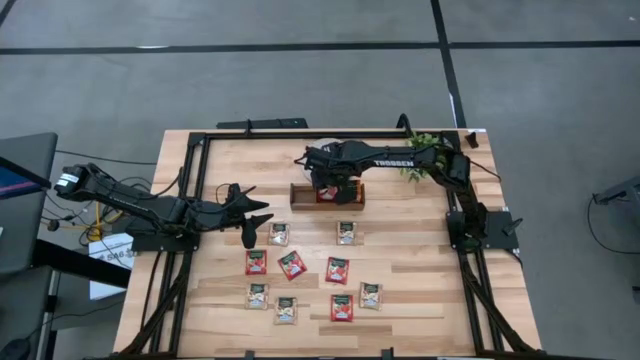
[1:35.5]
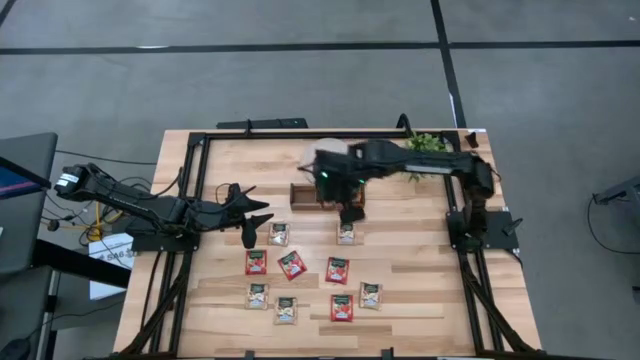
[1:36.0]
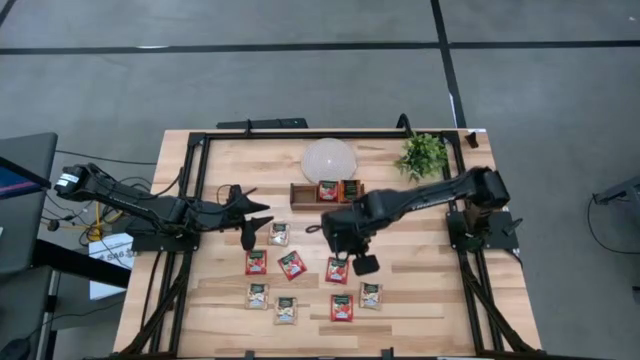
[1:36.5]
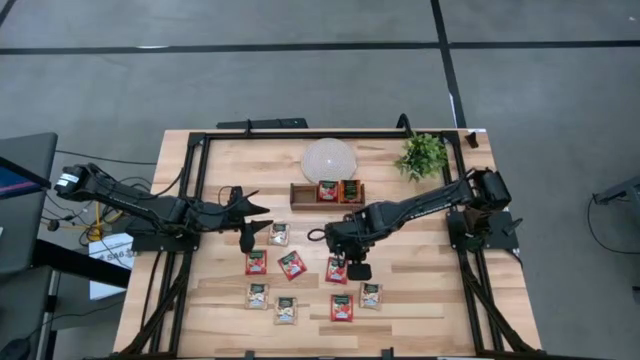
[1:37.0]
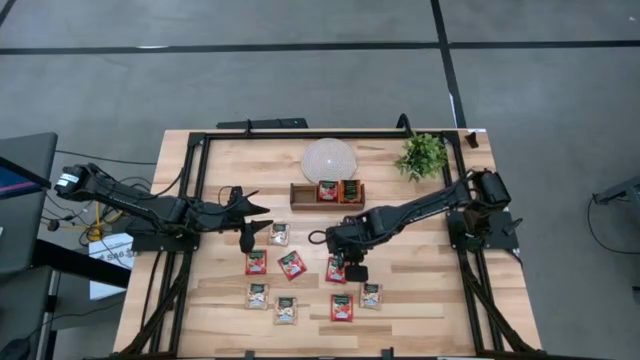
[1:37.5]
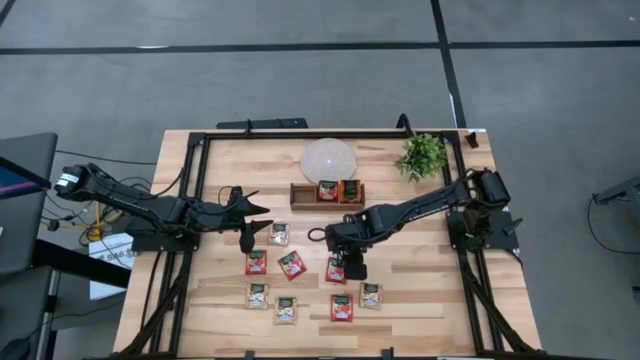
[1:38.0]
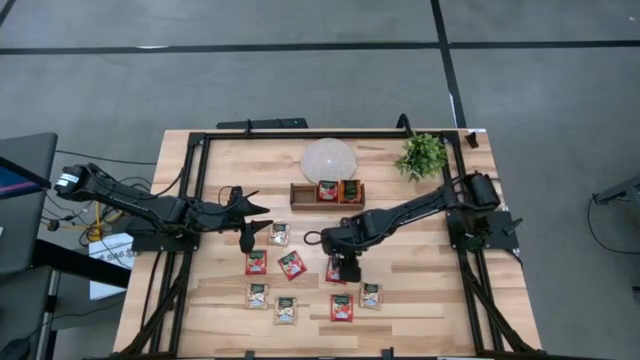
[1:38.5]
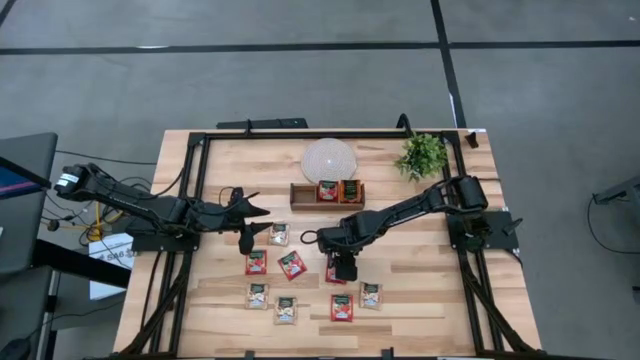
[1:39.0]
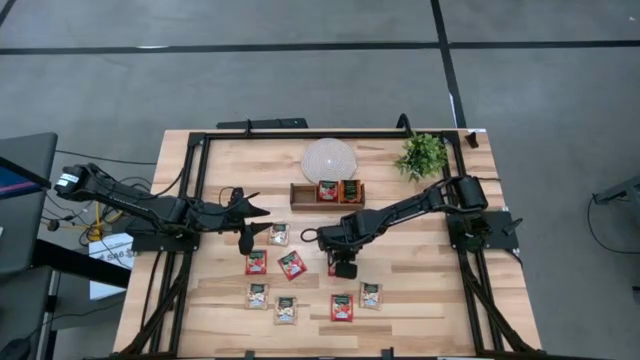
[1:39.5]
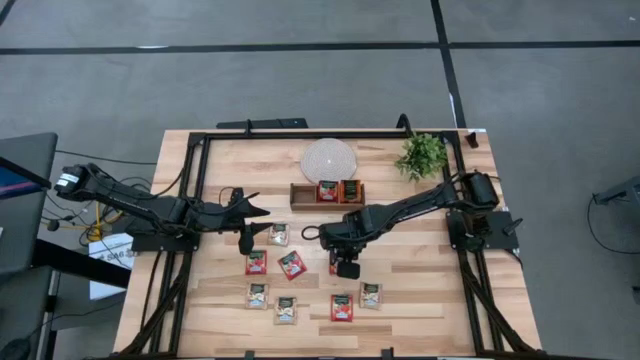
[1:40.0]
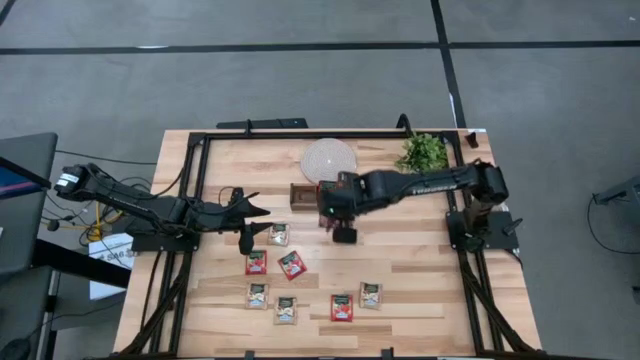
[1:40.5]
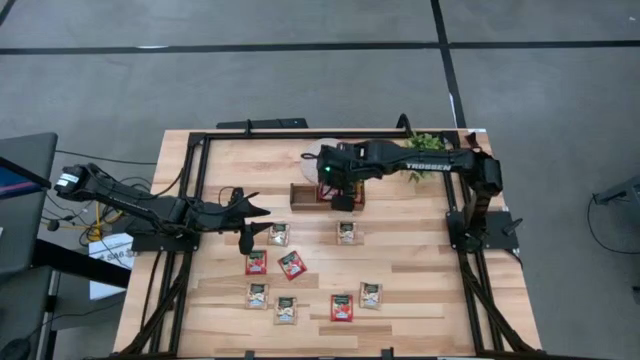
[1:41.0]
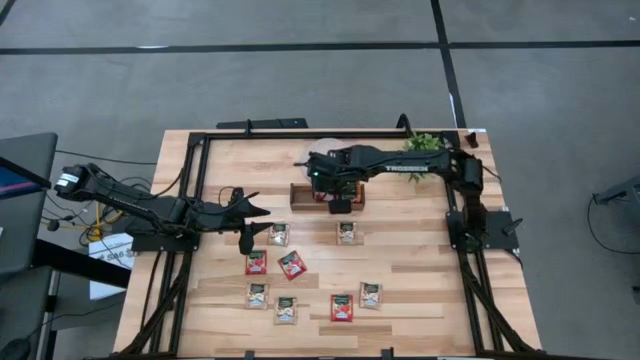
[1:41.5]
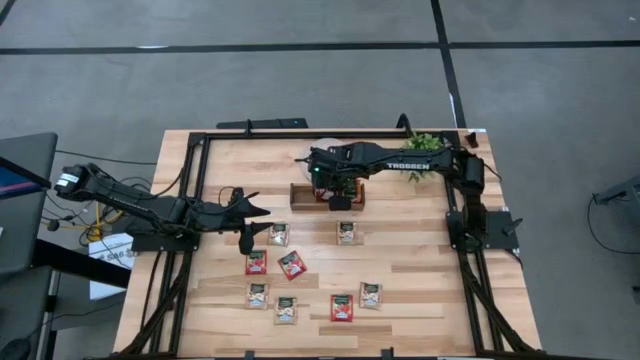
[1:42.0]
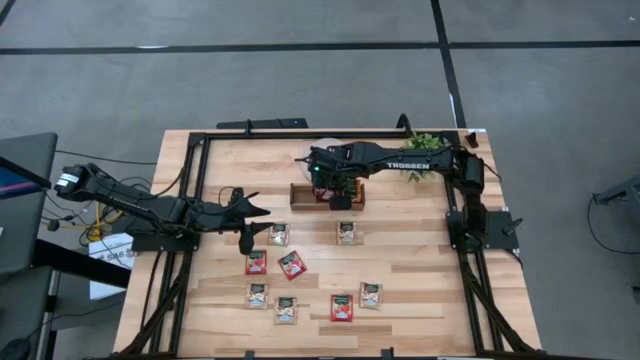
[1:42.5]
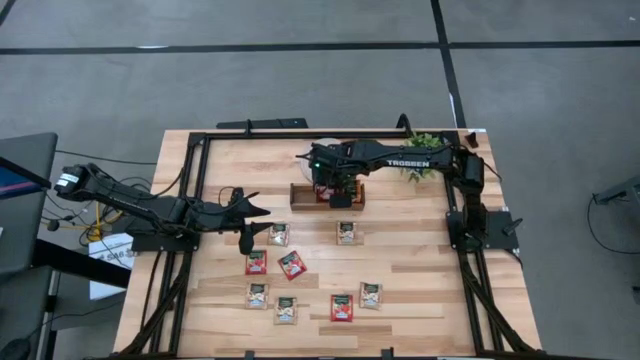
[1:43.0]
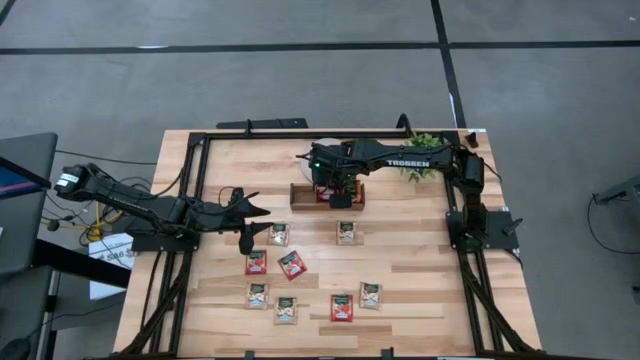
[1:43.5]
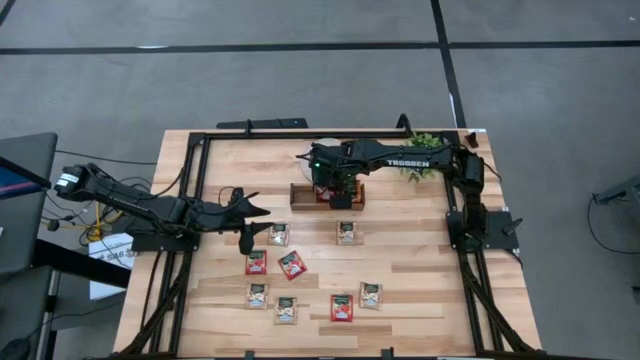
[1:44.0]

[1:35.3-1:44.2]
Task: Pick & Place Tea
Put the red tea bag into the middle compartment of the wooden organizer

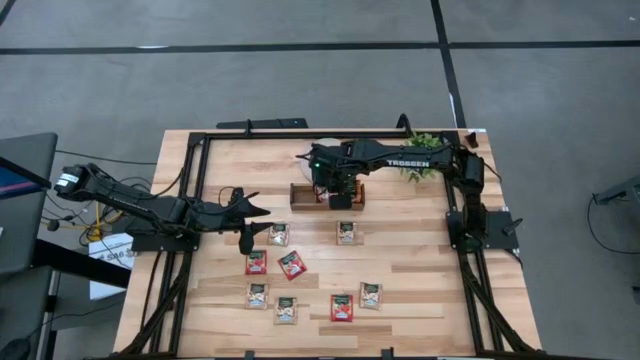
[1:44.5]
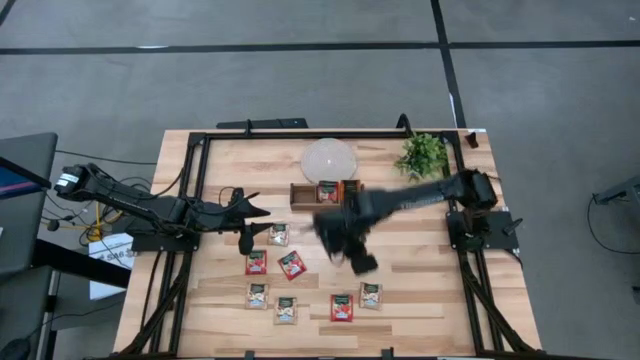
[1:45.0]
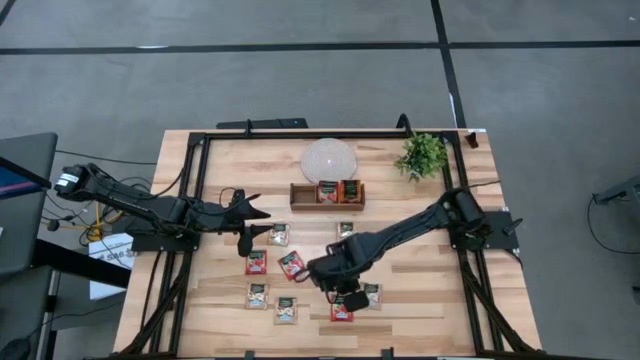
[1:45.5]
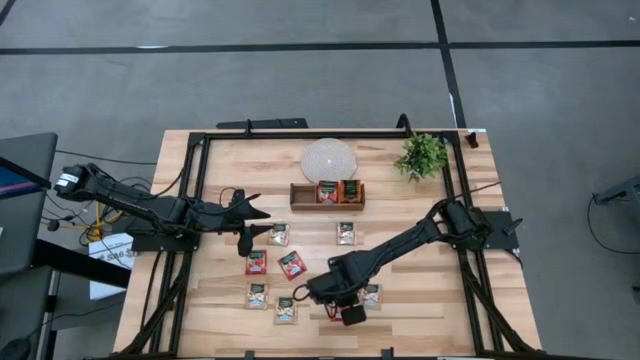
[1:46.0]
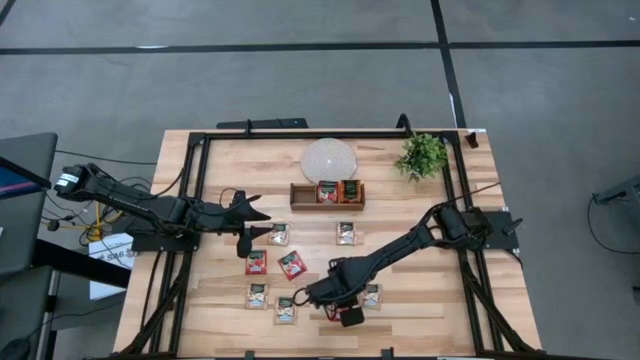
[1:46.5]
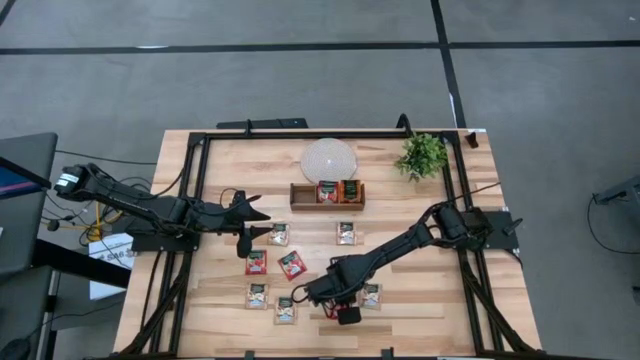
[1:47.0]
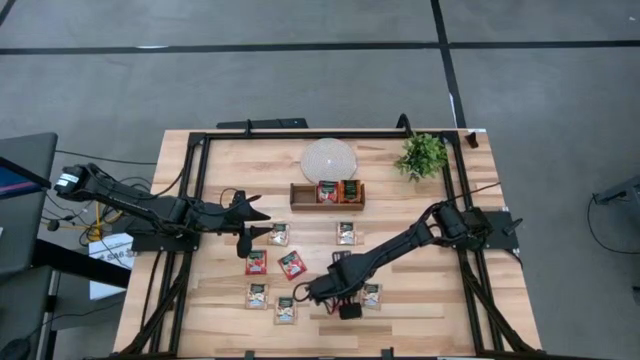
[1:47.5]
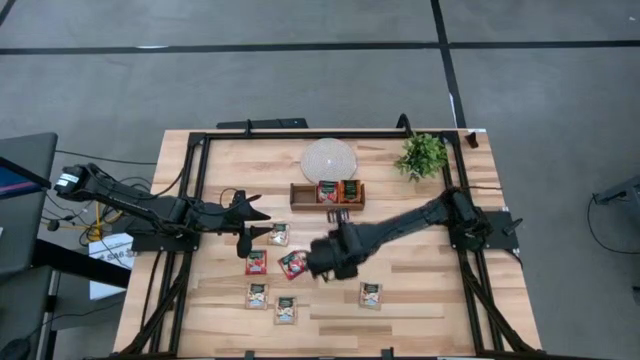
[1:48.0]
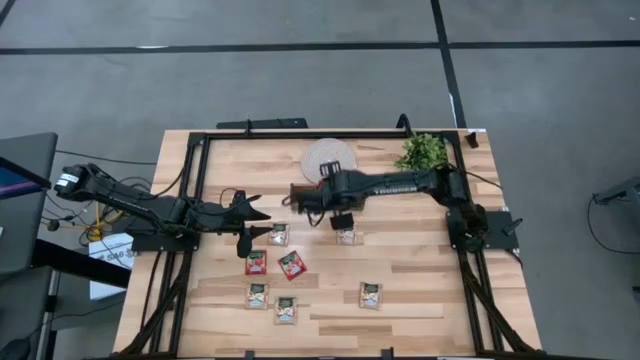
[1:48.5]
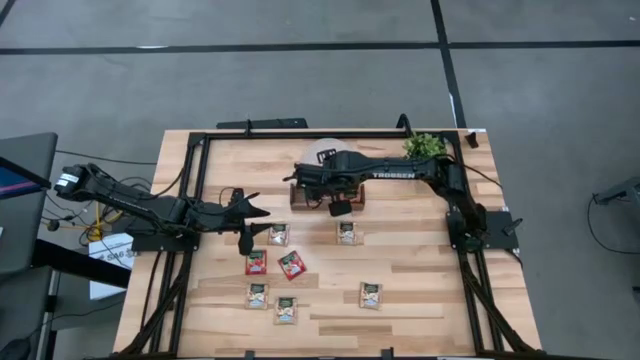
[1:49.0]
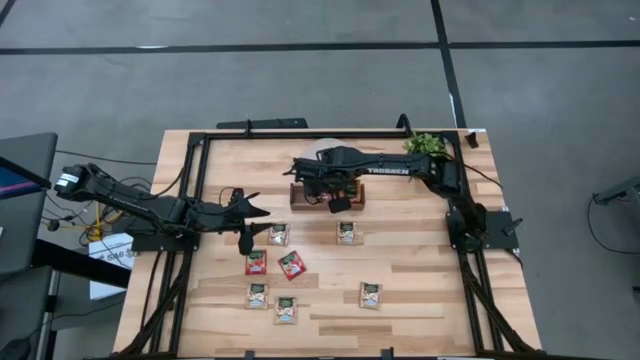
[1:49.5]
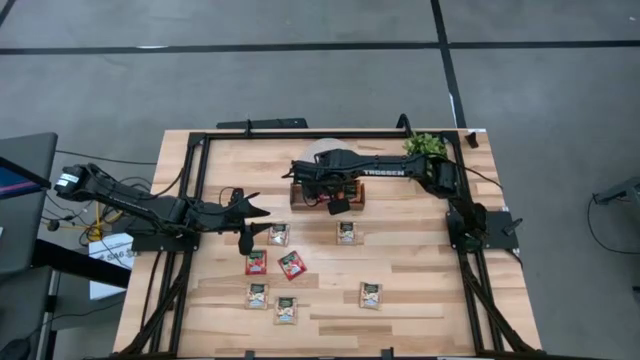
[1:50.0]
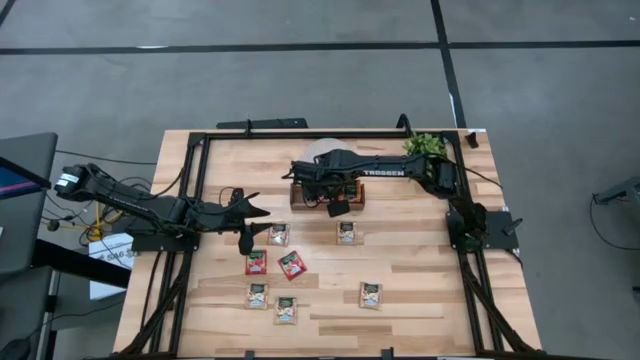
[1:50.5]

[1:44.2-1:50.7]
Put the bottom red tea bag into the middle compartment of the wooden organizer

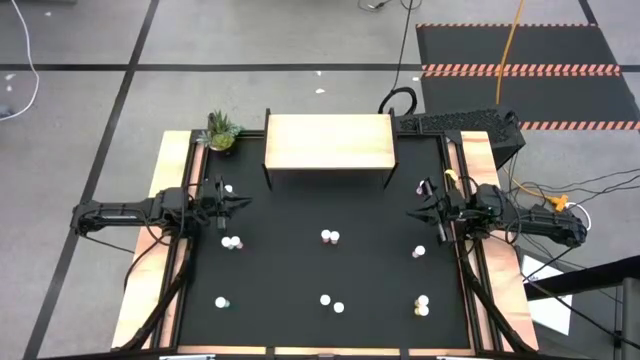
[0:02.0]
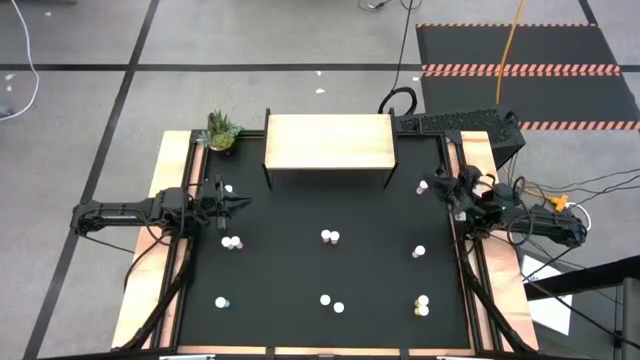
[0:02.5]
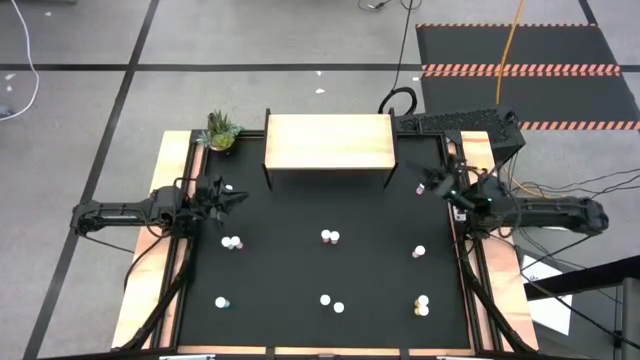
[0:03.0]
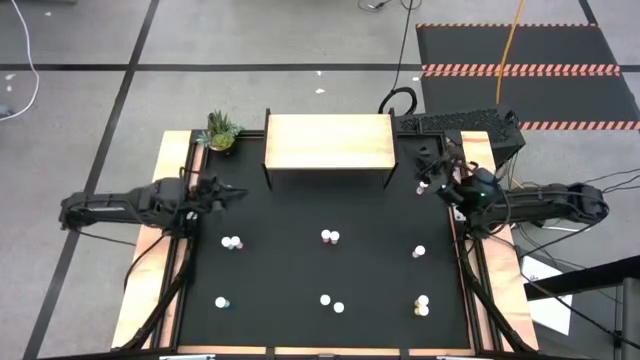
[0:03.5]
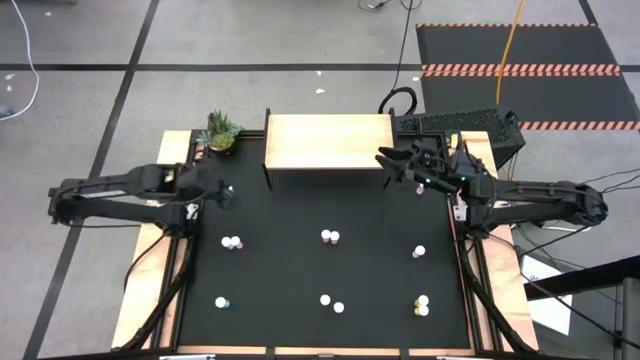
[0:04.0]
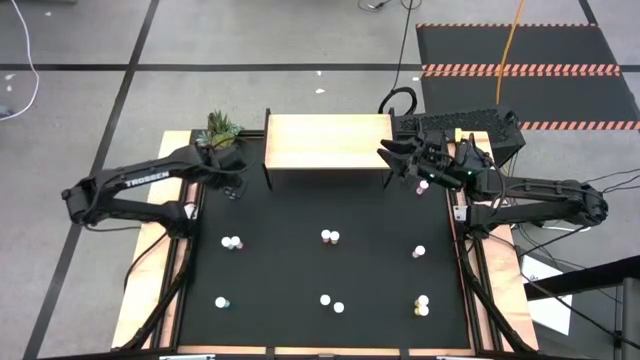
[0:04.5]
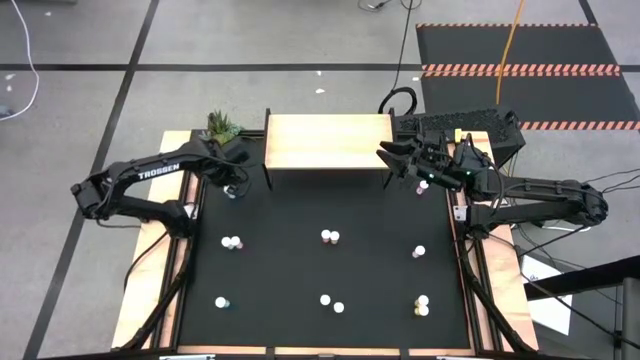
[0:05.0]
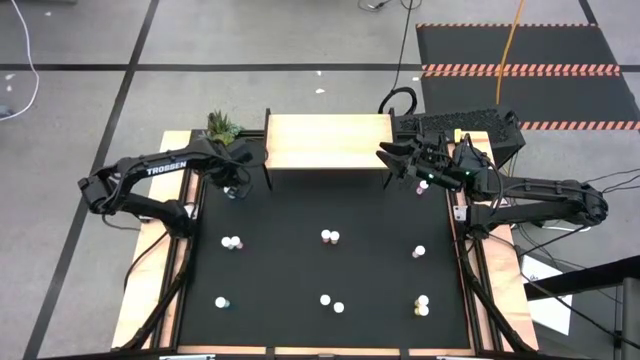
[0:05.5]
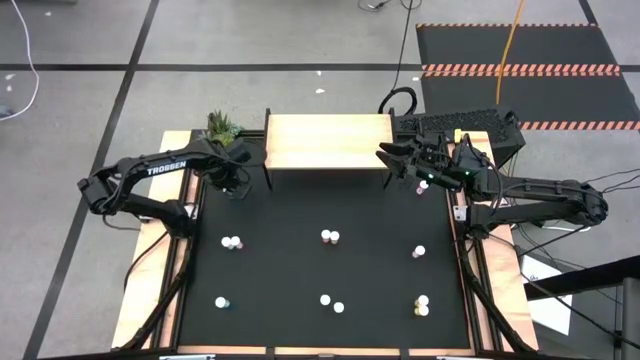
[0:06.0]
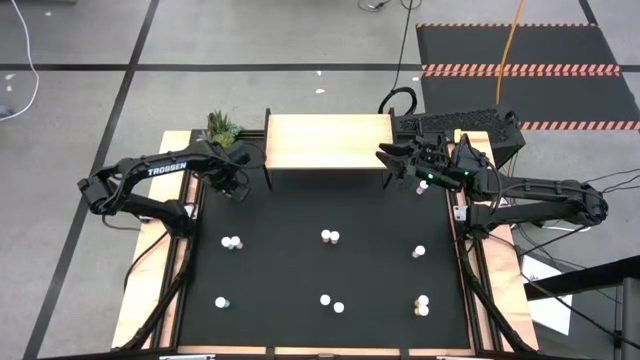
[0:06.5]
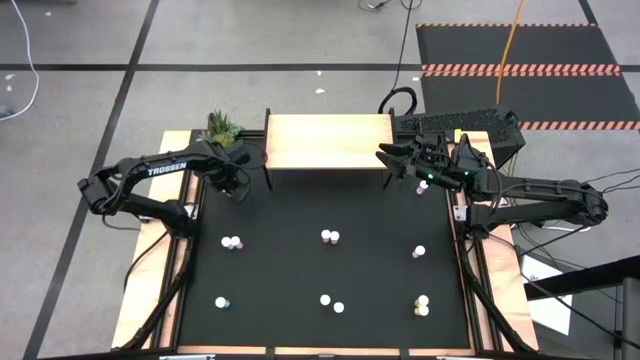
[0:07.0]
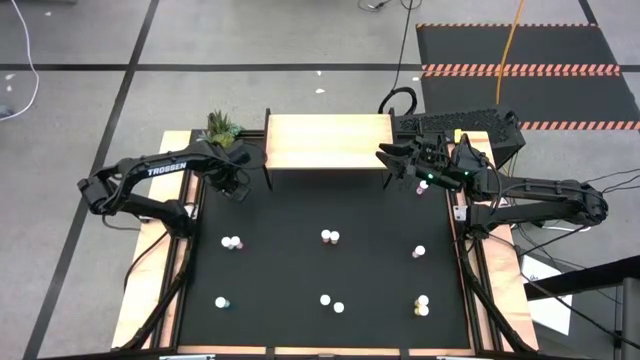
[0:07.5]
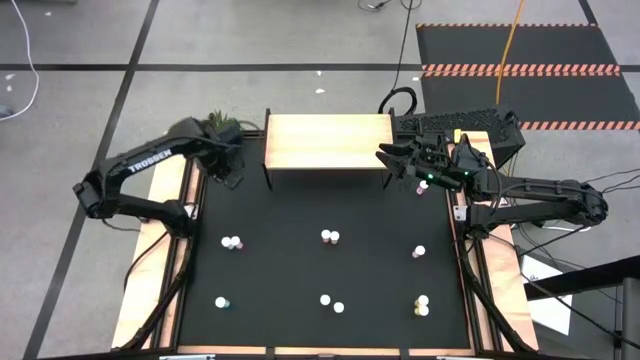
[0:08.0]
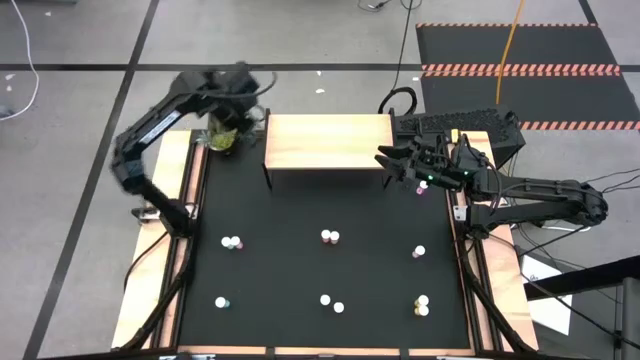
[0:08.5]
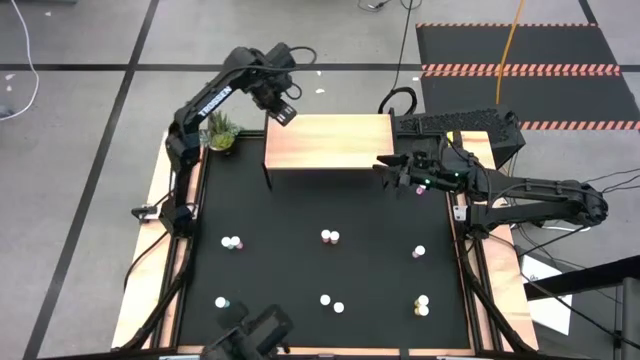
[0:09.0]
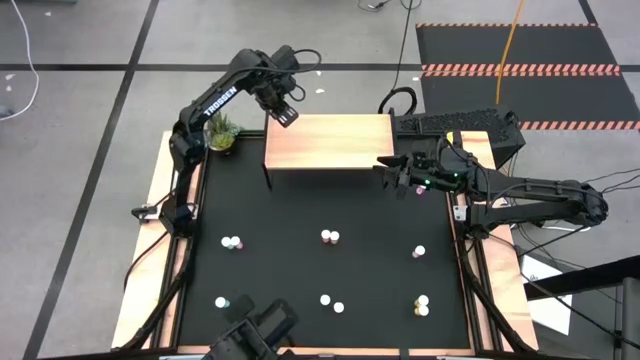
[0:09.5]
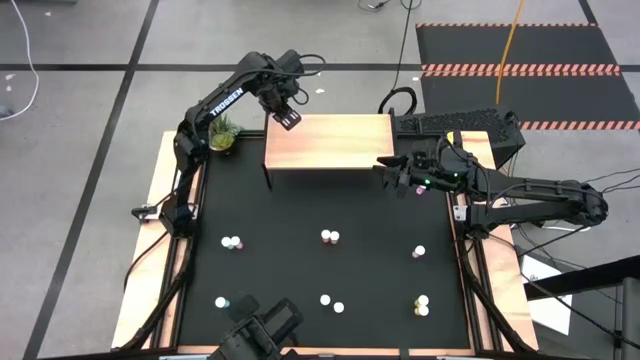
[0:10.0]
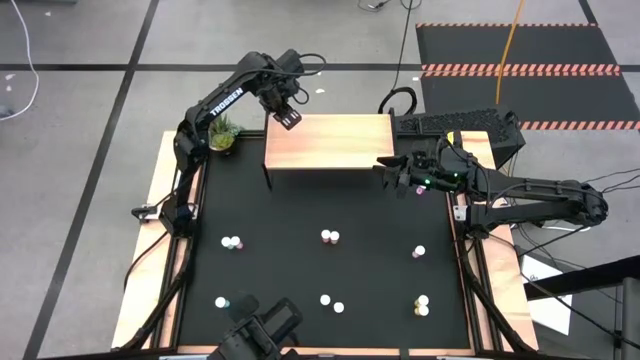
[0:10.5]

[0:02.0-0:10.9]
Task: Pick and place medicine bottles onto shelf by color
Put the top blue pill bottle on the shelf
